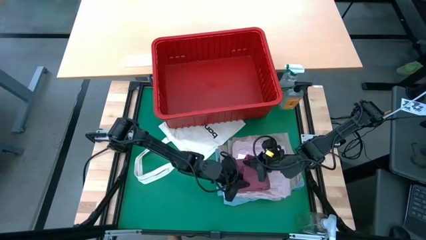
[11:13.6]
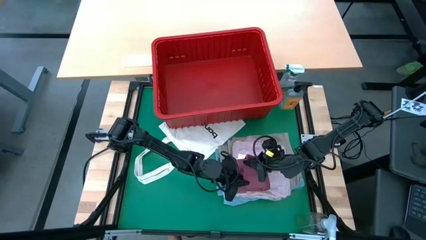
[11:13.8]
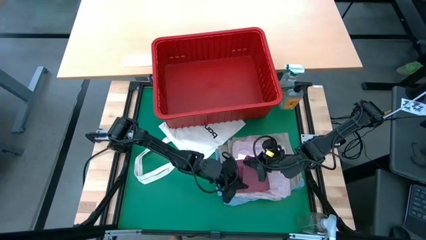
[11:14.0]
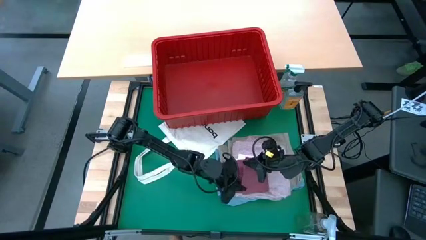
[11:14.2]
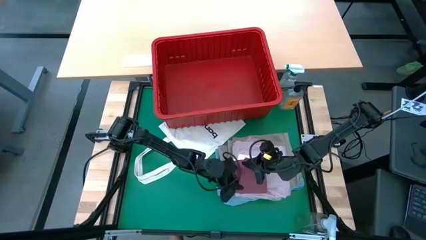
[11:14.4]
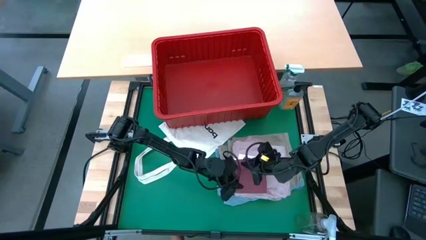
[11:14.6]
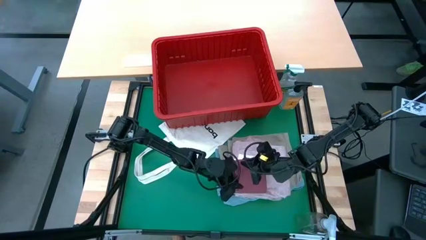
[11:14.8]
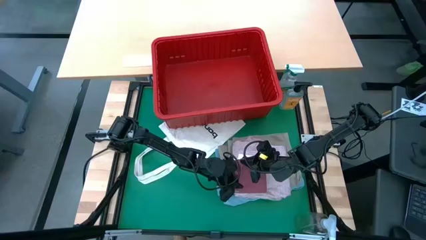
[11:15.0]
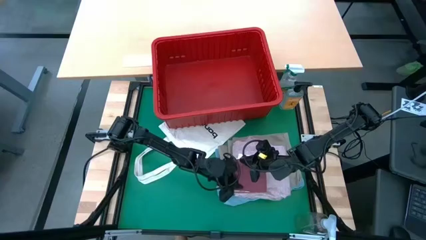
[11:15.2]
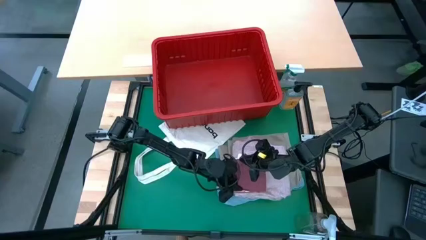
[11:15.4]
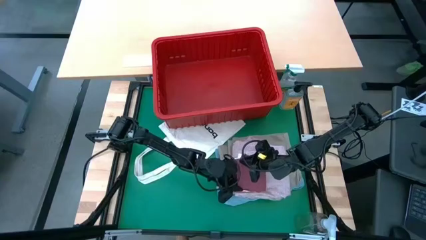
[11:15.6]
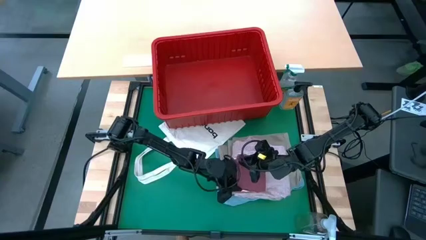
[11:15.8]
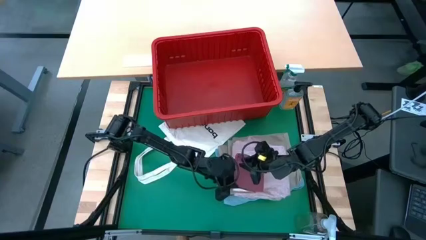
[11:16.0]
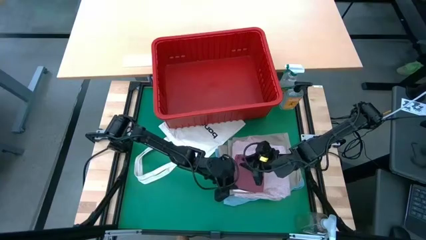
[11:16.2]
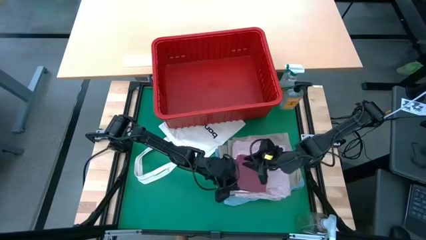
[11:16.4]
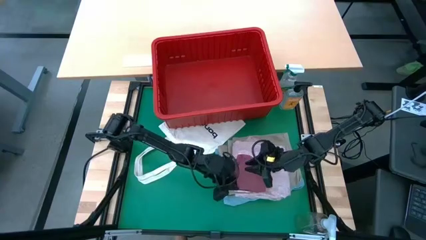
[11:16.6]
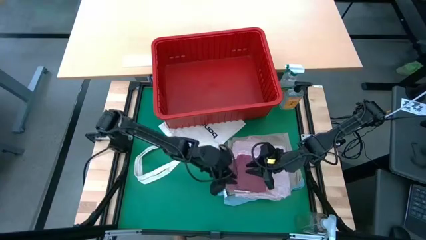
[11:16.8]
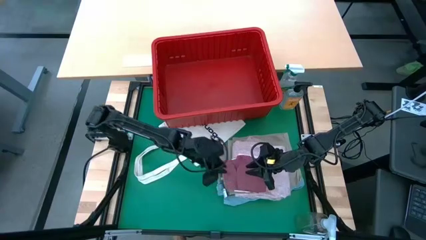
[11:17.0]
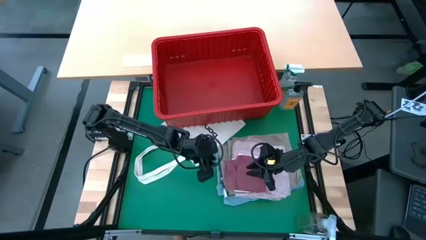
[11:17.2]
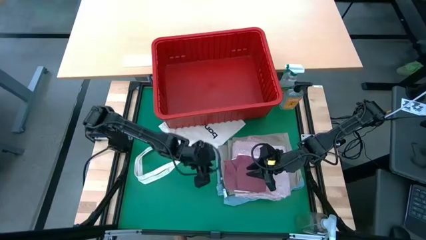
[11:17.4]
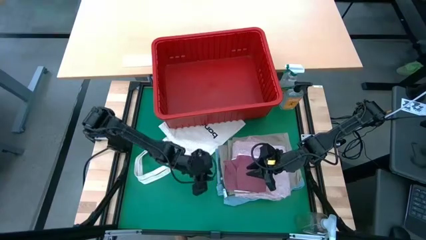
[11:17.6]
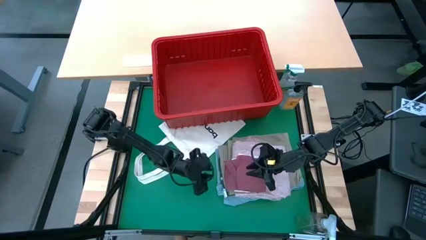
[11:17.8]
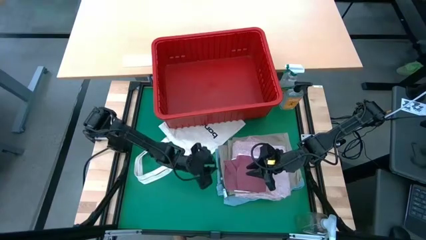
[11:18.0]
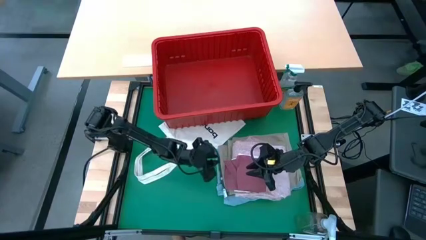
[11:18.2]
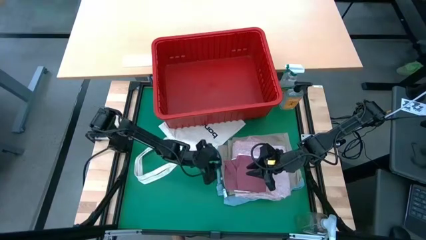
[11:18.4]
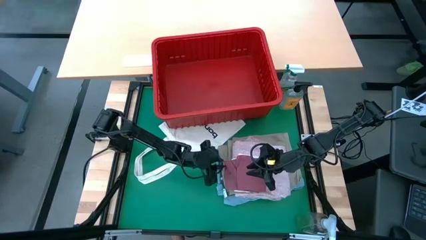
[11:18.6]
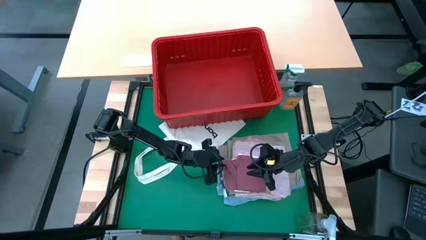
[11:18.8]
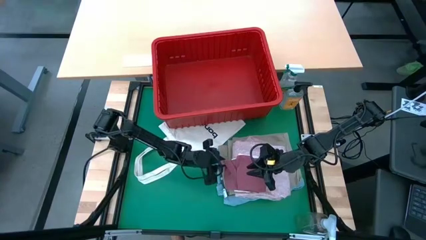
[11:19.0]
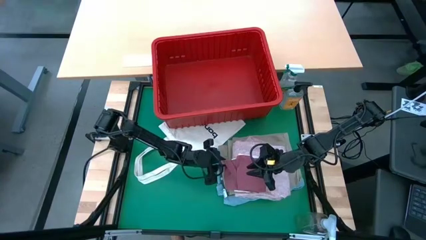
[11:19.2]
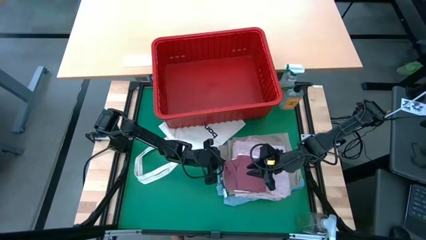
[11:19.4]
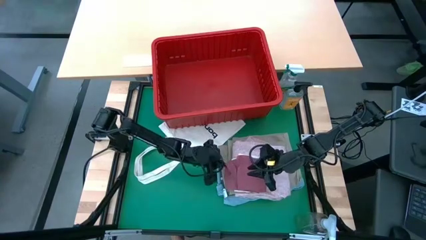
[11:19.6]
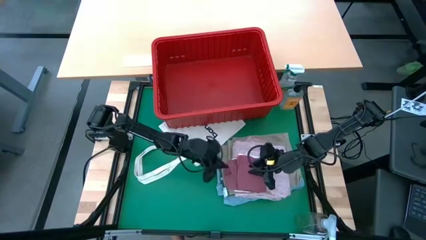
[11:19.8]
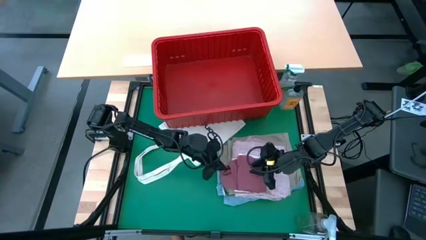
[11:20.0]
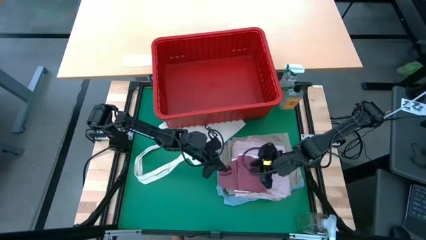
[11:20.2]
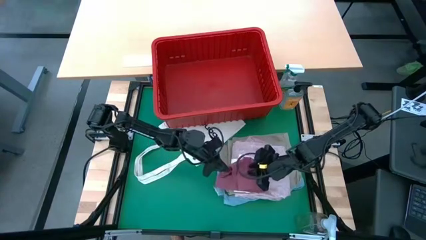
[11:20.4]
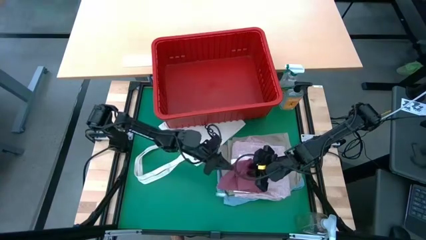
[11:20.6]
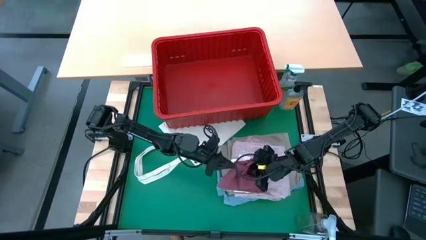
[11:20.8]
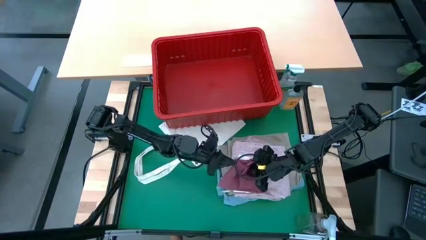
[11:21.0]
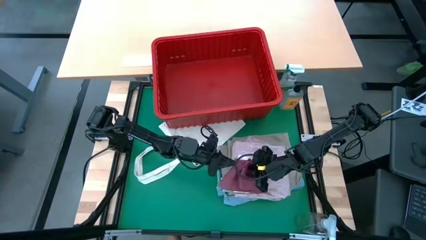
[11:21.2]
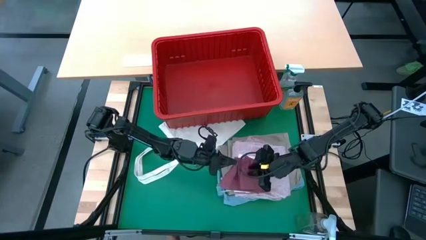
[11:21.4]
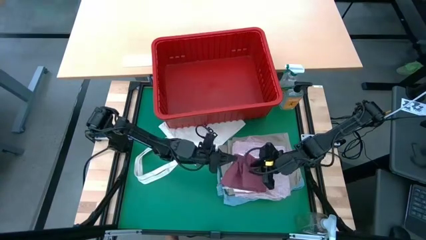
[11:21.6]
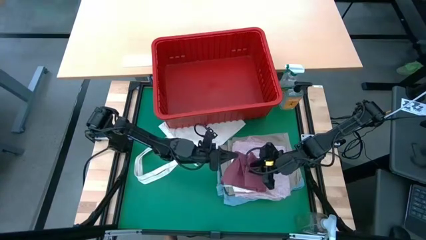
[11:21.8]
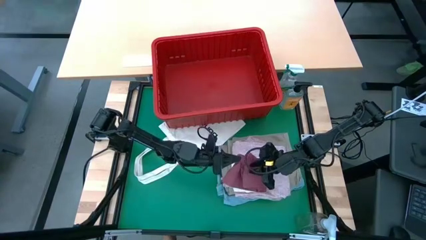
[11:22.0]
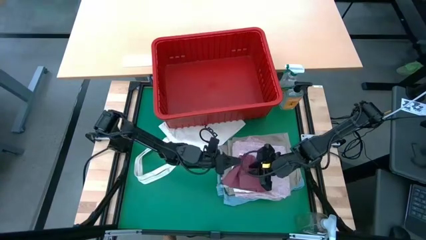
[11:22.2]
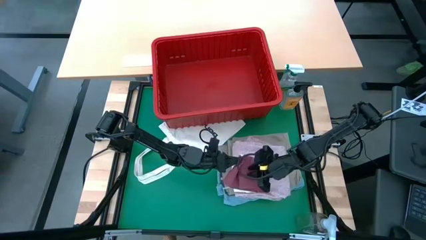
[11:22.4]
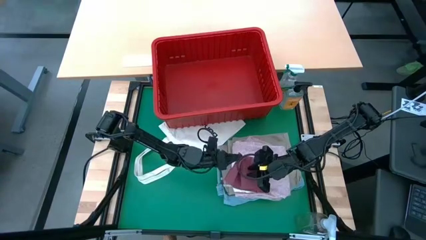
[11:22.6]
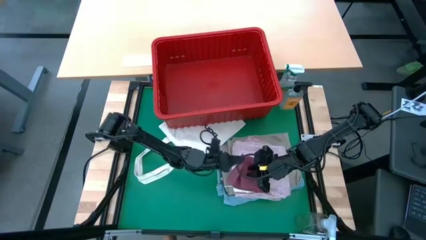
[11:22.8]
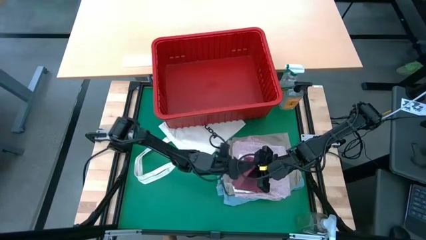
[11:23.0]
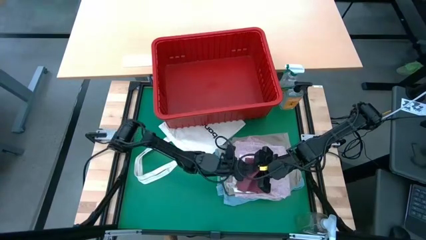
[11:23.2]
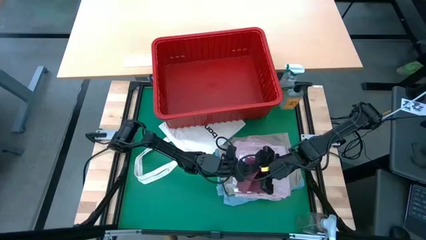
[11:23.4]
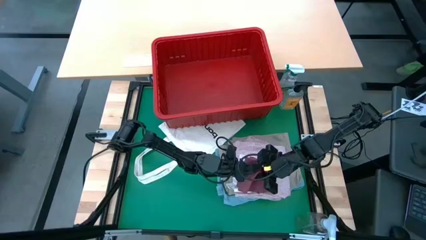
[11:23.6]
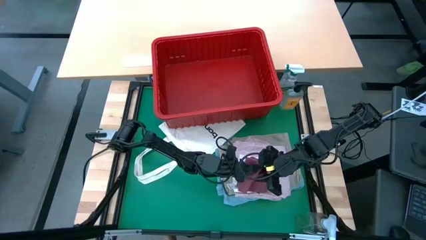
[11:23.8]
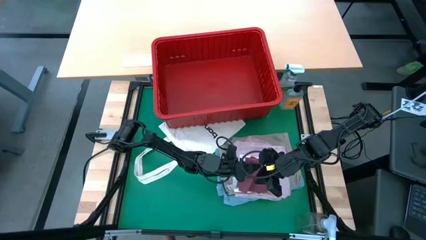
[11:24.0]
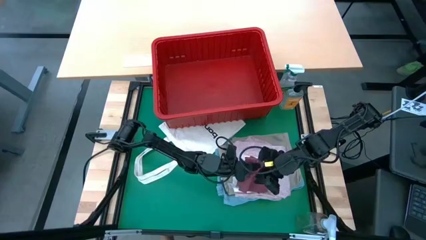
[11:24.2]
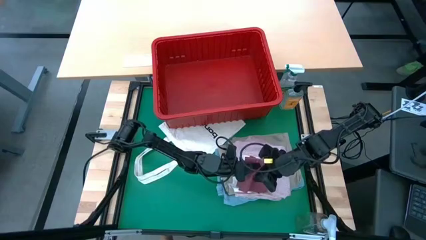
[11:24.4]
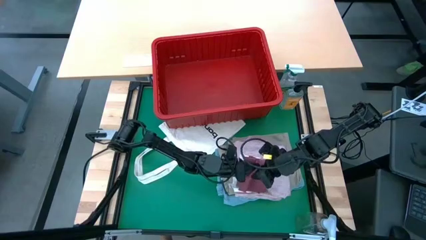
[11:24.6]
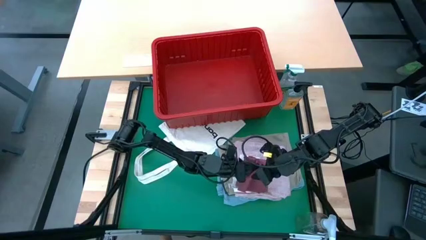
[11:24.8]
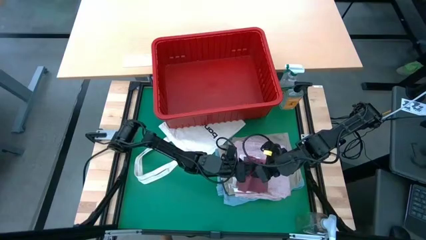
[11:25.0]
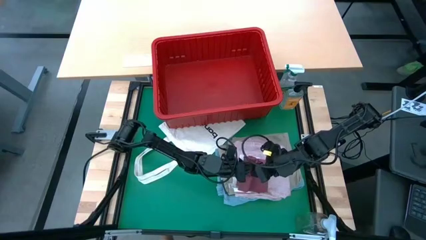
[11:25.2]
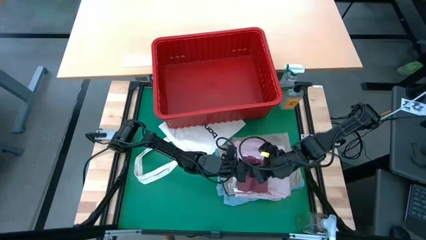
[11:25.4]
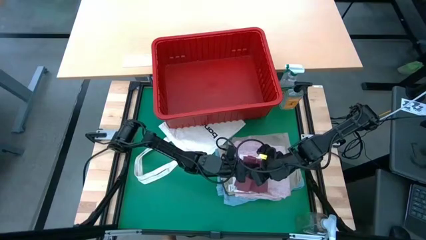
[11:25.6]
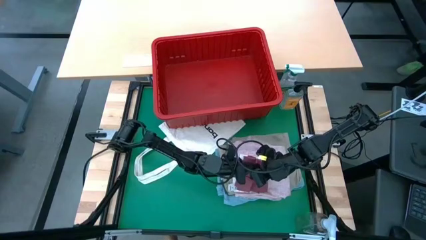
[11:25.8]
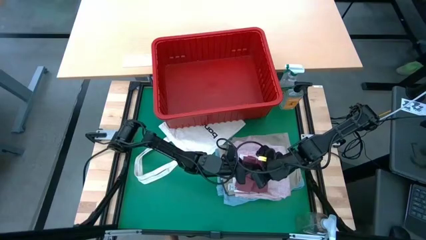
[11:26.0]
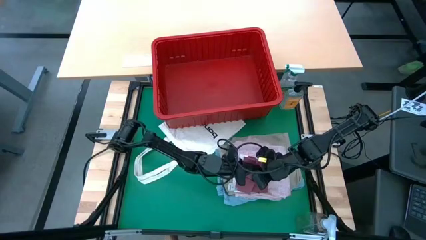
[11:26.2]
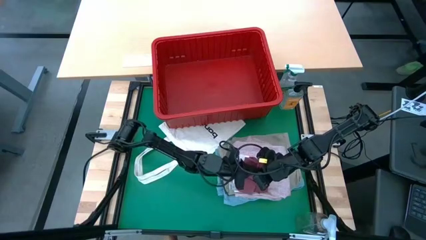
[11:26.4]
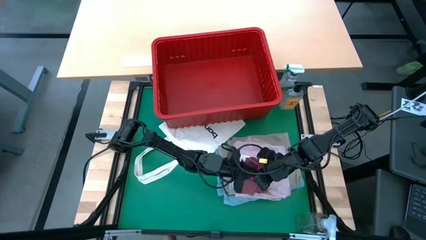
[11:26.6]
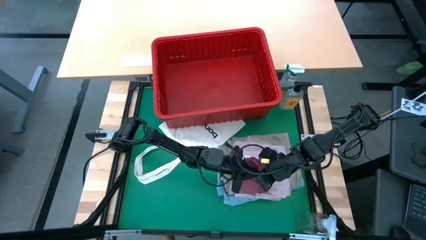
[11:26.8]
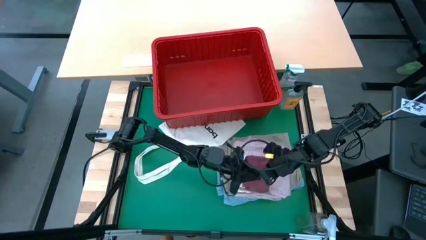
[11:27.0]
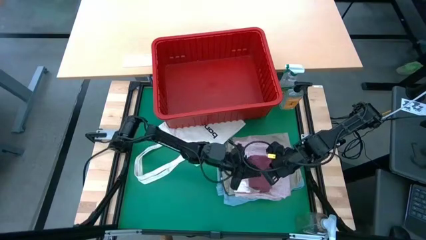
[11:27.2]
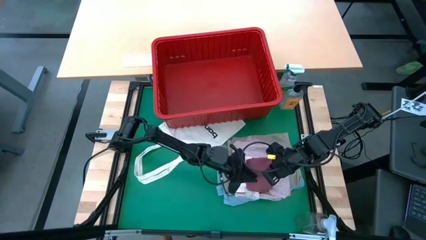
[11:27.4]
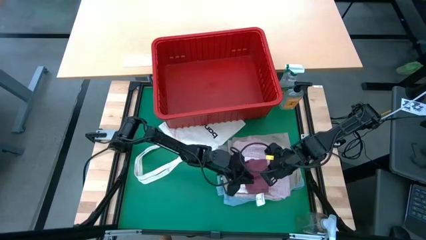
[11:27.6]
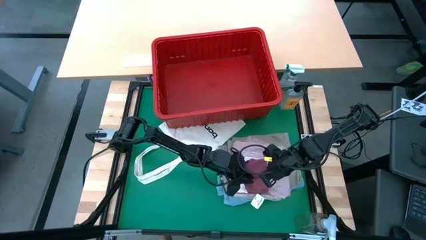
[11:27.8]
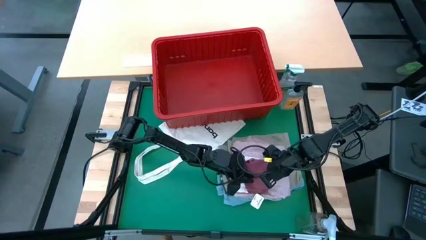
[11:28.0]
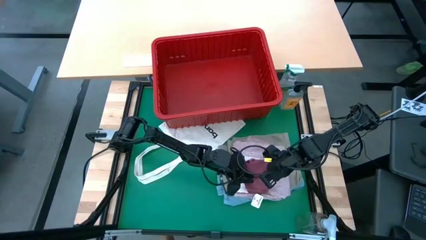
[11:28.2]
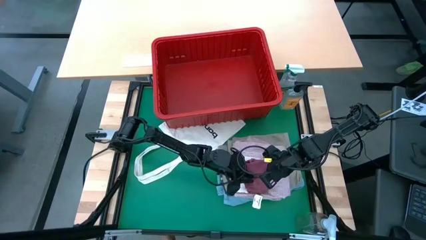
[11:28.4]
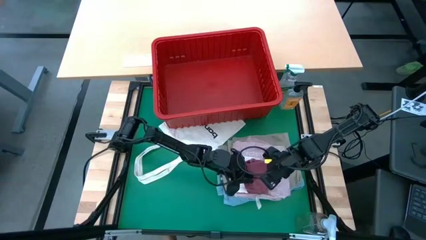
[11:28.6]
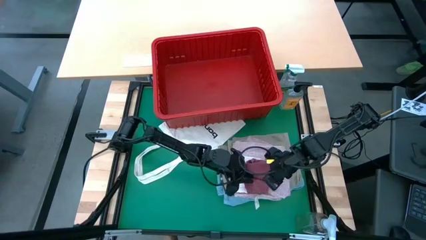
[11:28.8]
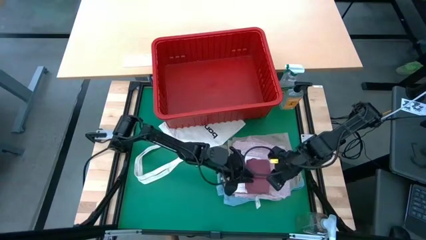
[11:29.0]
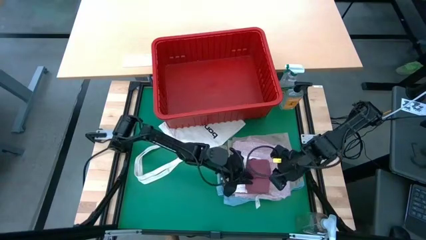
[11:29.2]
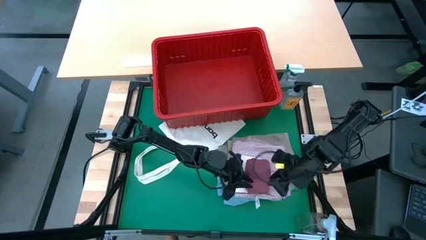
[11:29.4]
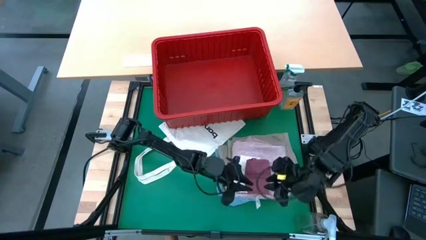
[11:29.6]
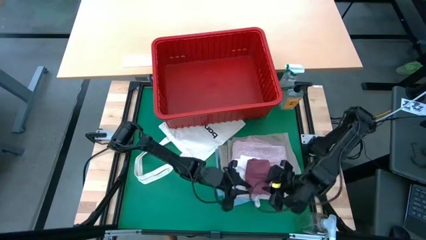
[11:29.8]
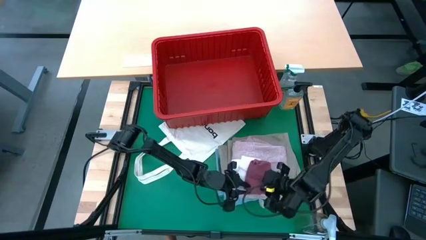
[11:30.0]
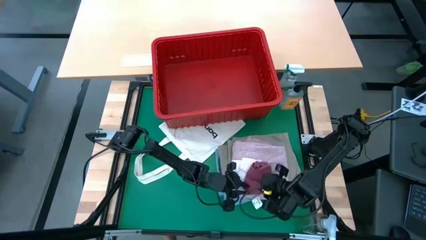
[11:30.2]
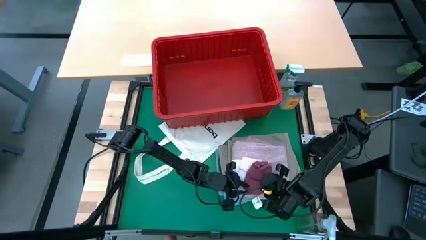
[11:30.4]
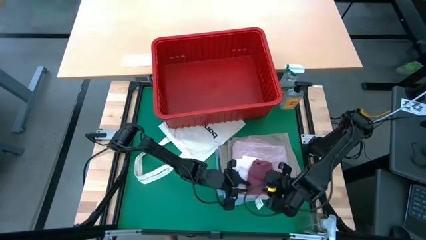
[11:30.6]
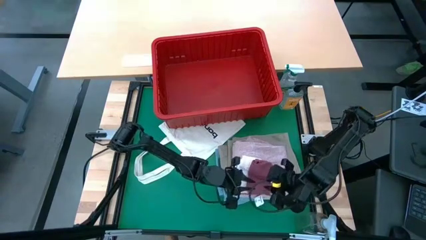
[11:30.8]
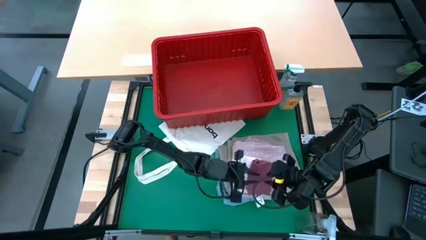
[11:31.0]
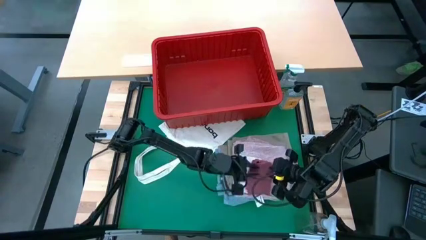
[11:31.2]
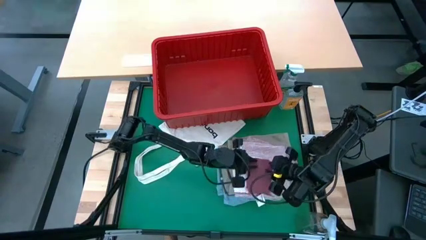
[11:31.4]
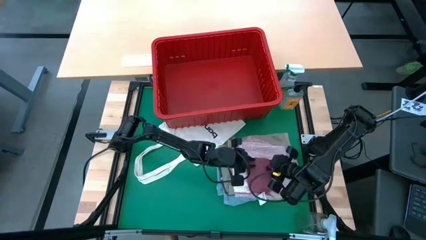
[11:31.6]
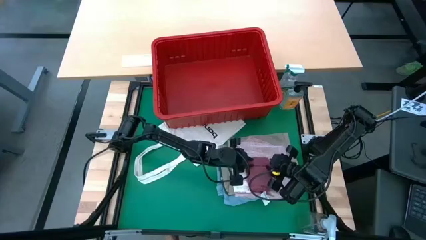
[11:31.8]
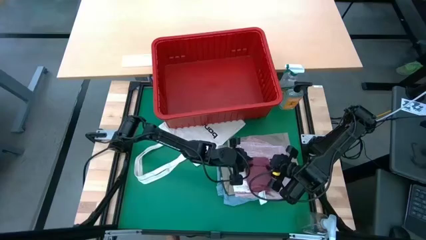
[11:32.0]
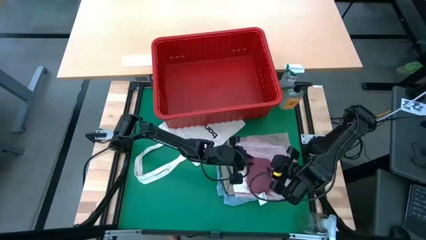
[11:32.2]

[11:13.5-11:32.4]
Task: Fold laundry
Fold the red underwear
